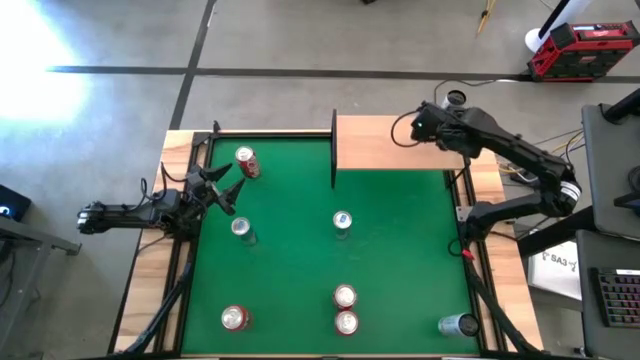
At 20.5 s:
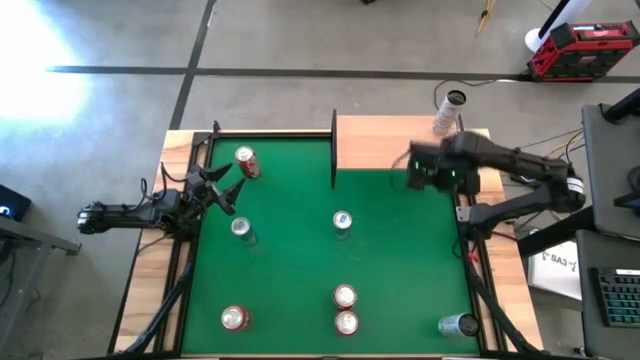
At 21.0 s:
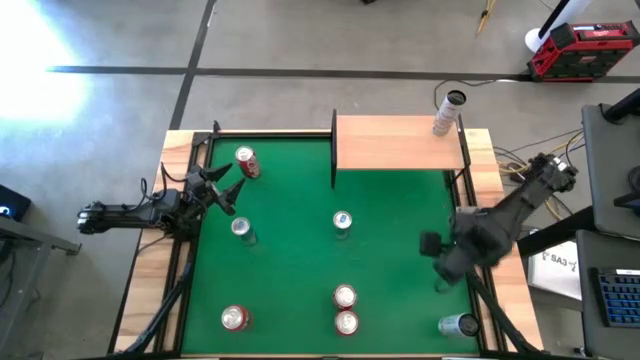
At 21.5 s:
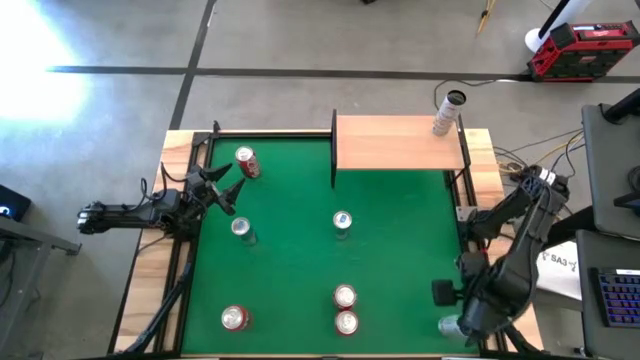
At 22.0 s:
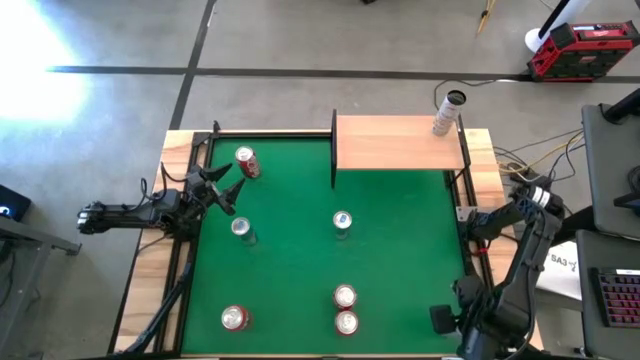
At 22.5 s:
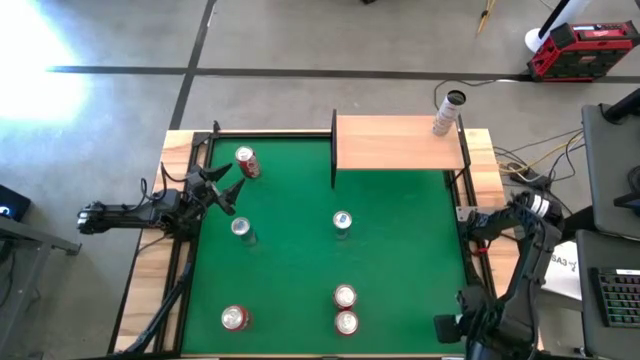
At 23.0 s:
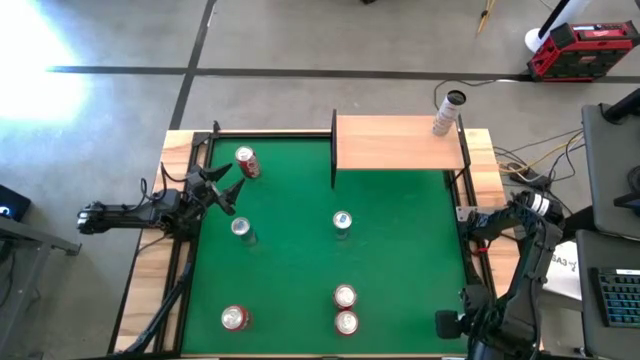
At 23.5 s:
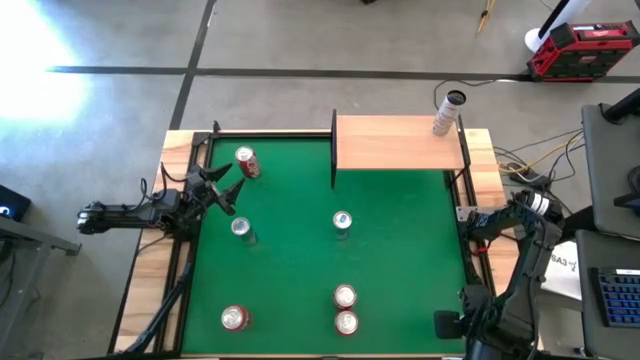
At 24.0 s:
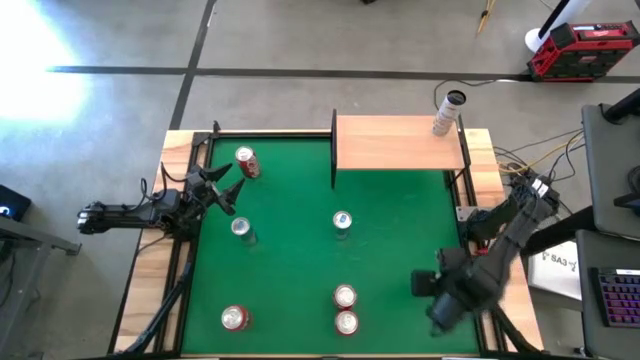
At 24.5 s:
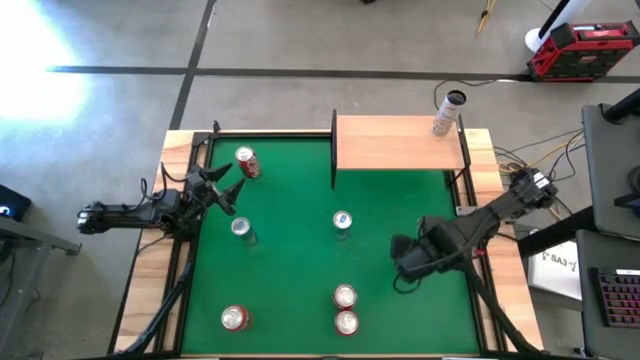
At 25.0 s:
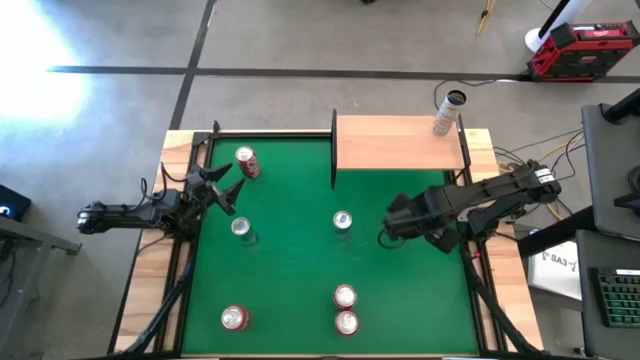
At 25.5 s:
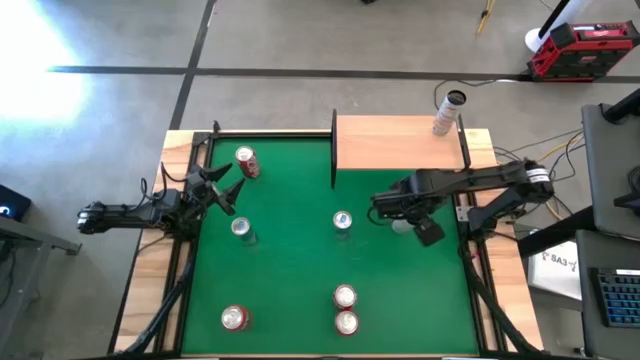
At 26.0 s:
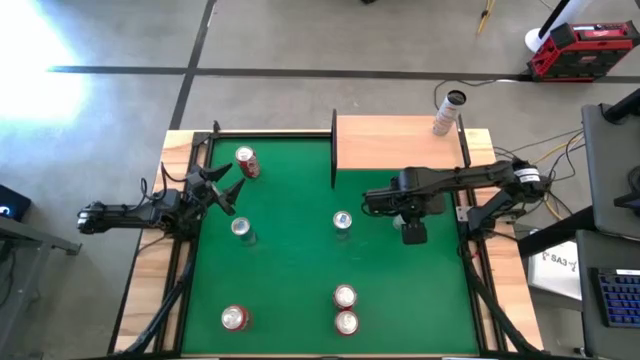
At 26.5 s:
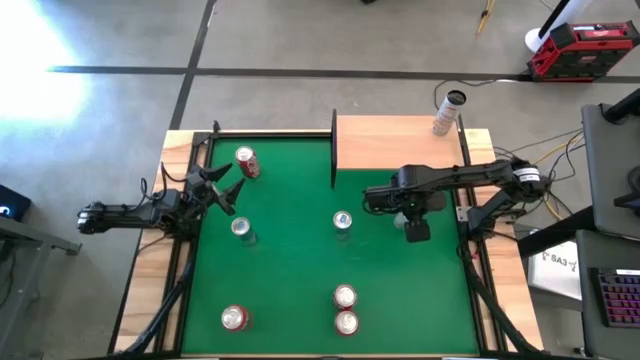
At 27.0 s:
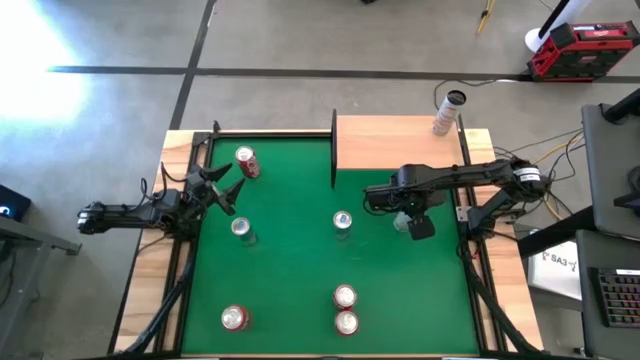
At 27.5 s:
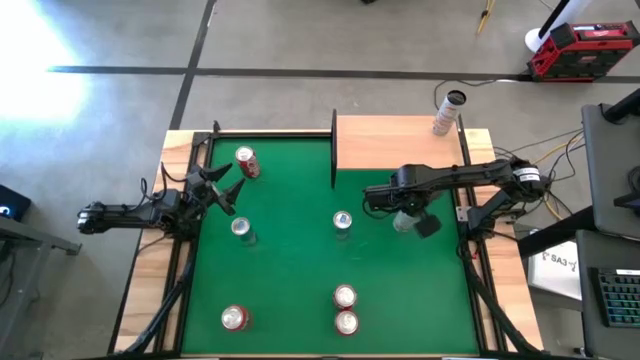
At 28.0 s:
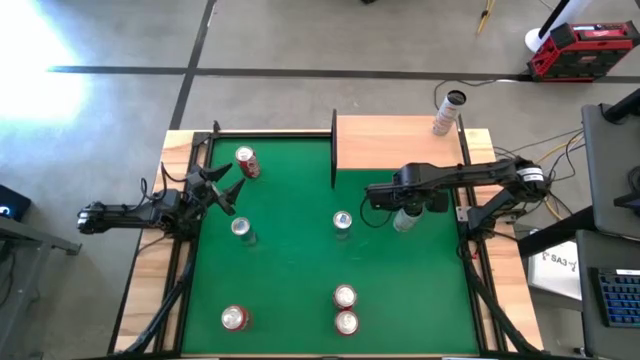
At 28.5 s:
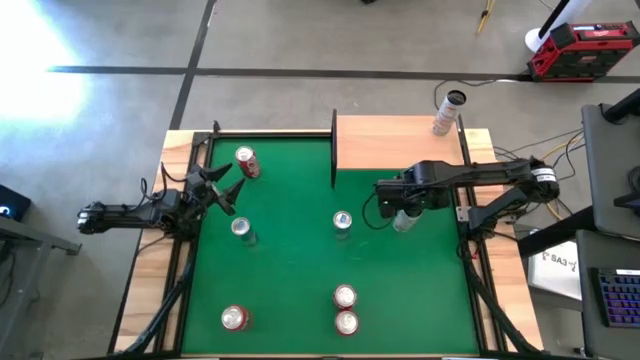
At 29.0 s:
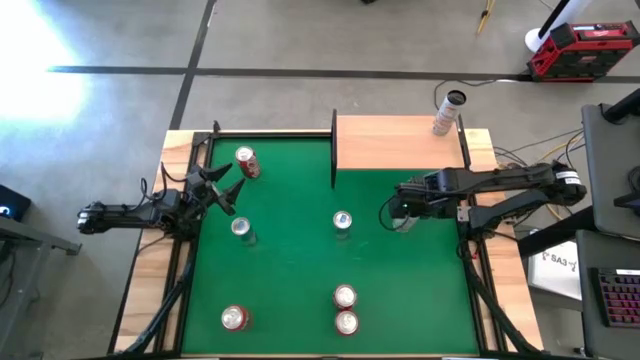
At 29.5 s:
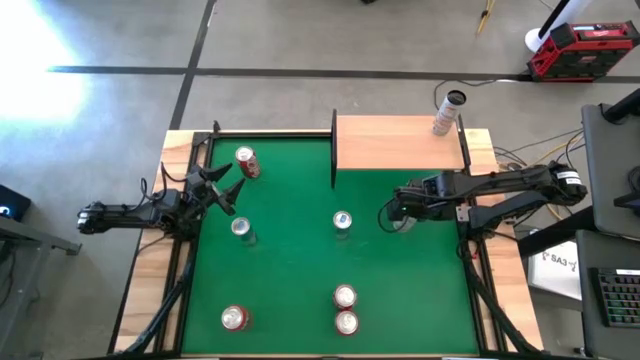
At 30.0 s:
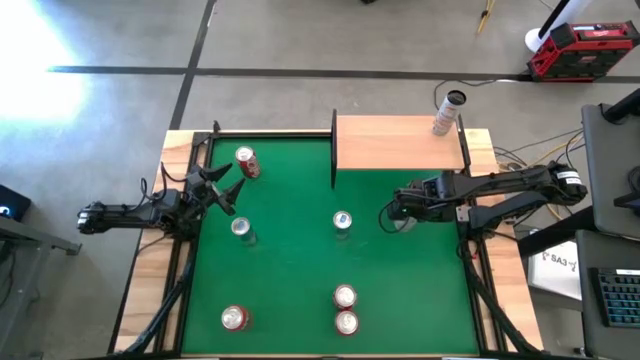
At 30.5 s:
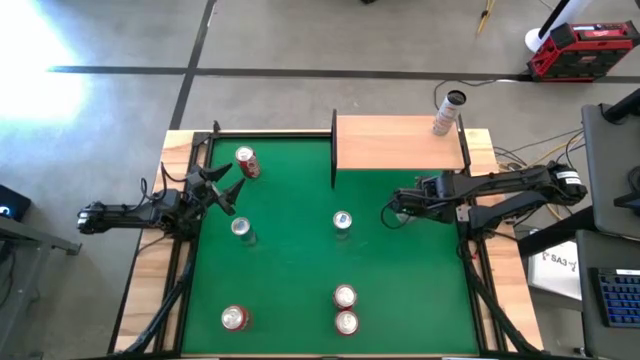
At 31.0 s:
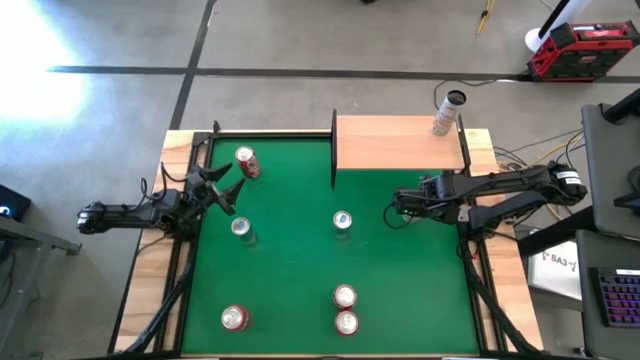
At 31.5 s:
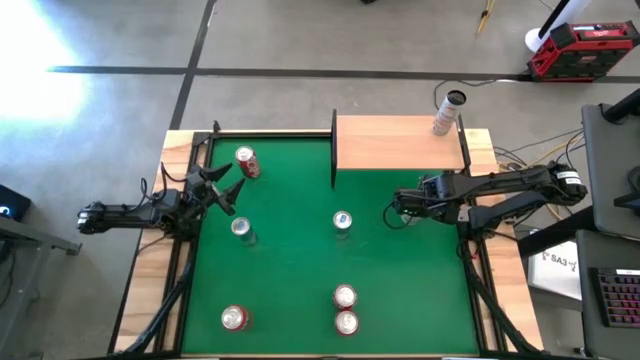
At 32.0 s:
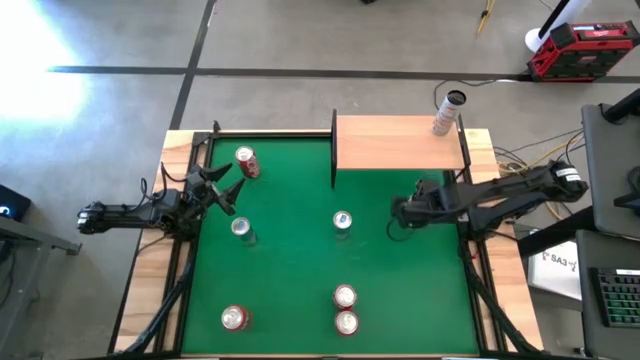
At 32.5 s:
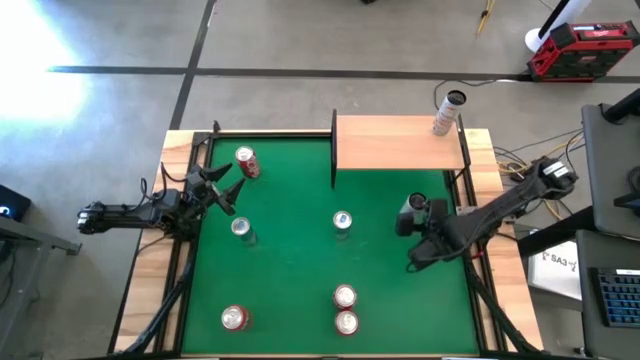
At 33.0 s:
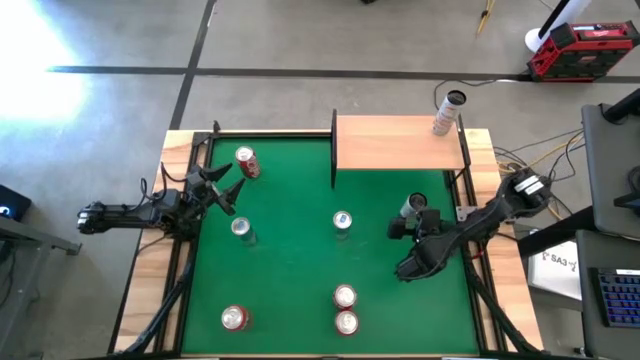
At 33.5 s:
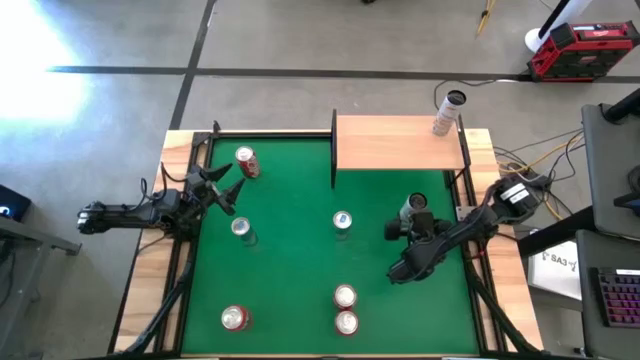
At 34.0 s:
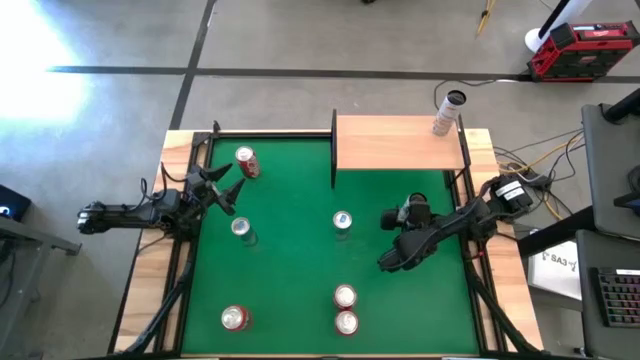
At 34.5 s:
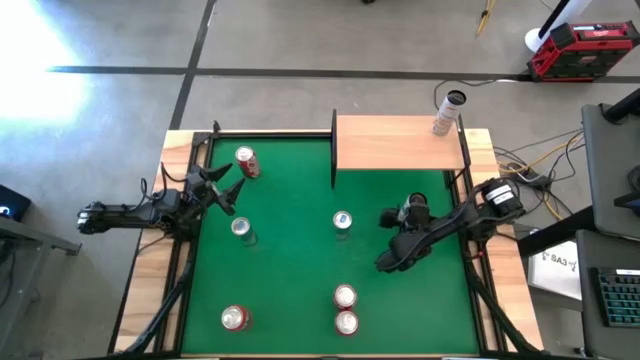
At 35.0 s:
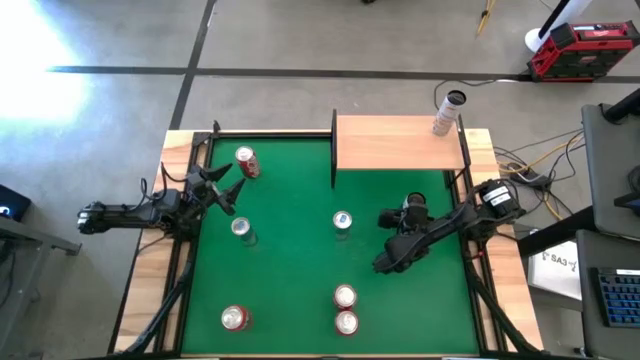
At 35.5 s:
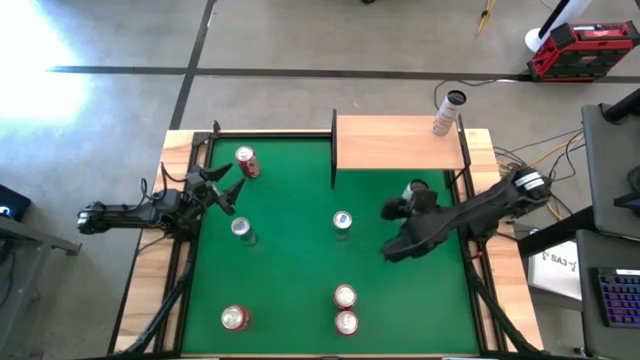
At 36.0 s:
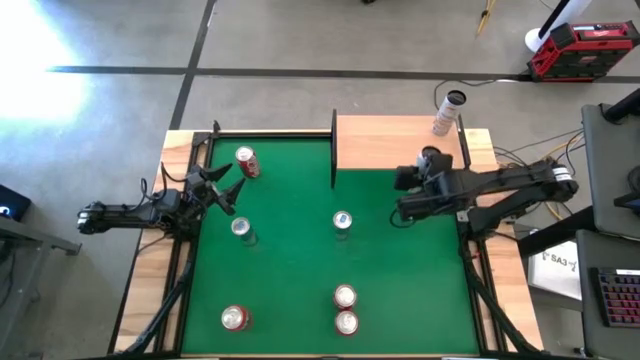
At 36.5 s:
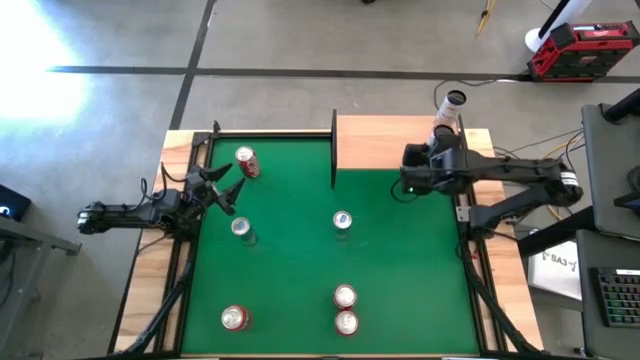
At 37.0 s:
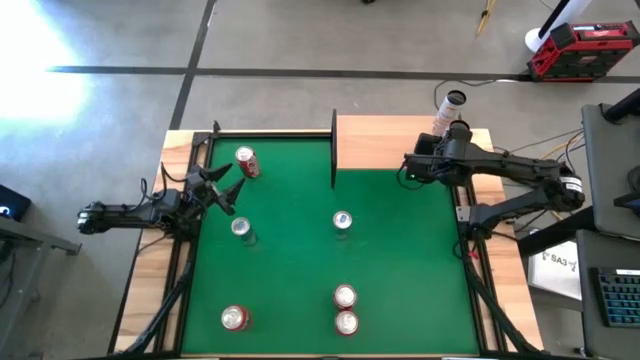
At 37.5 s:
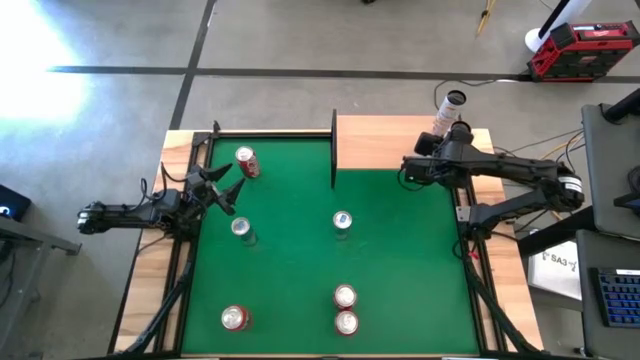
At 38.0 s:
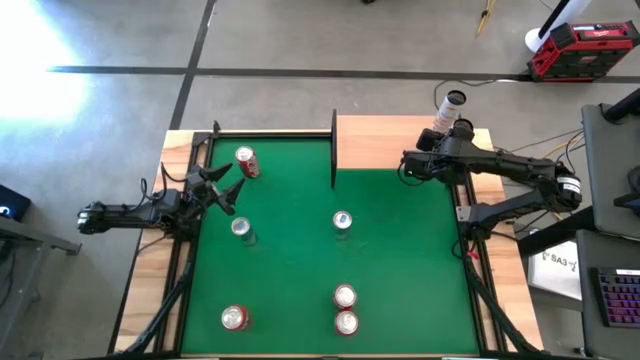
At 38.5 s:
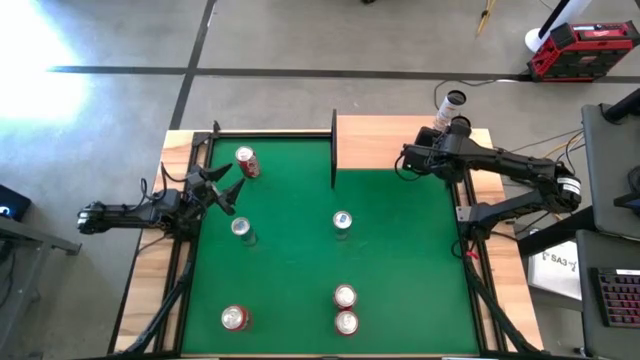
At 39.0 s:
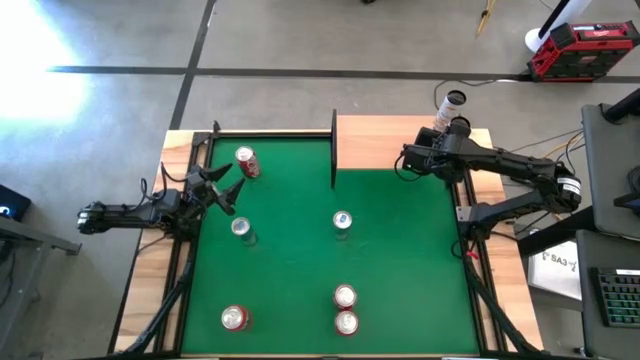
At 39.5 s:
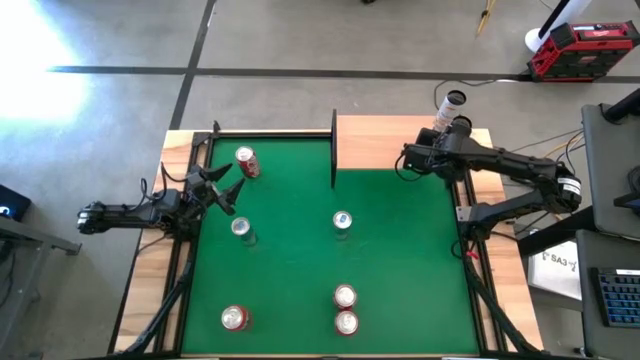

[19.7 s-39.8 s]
Task: Place canned beverage on shelf
Put the white yellow soda can on the shelf aligned with the other white yellow soda can
